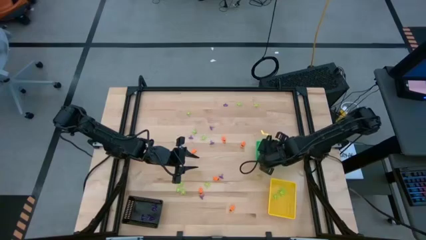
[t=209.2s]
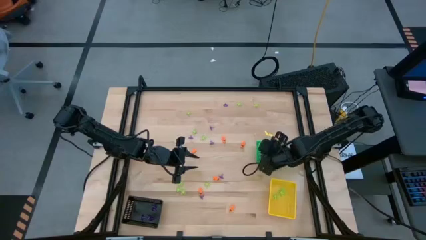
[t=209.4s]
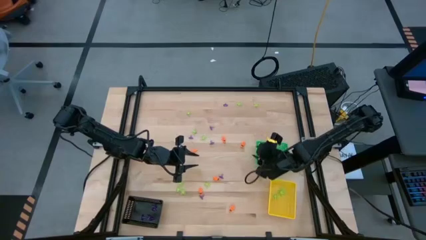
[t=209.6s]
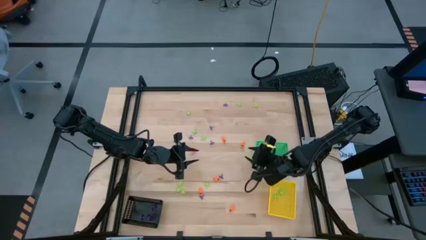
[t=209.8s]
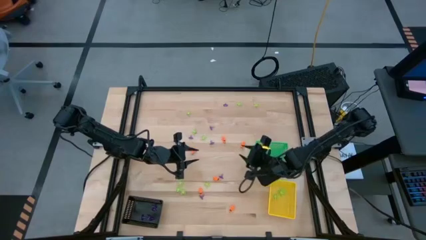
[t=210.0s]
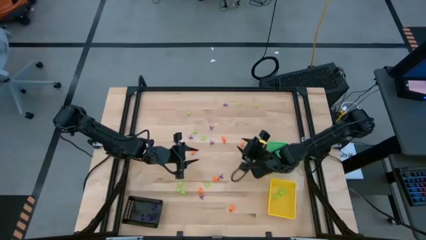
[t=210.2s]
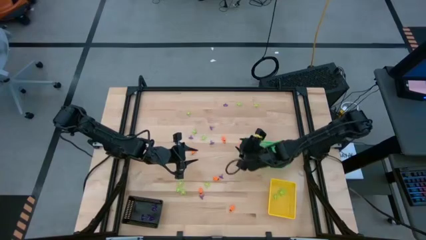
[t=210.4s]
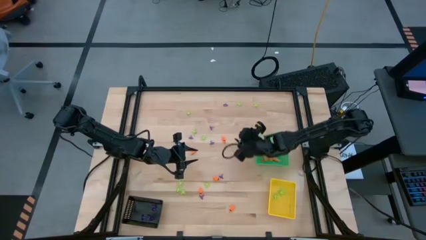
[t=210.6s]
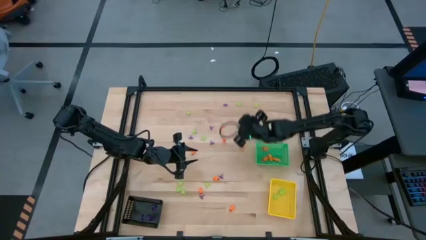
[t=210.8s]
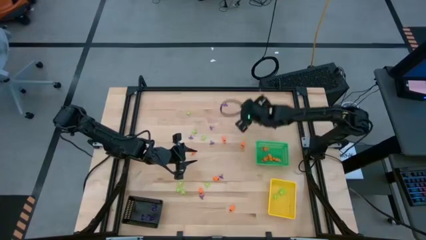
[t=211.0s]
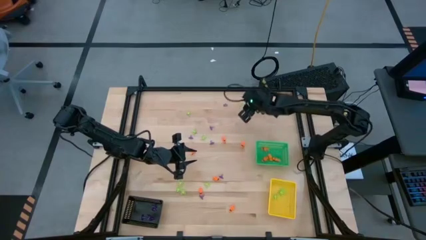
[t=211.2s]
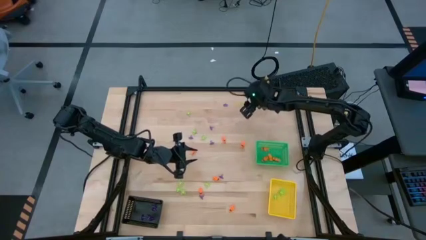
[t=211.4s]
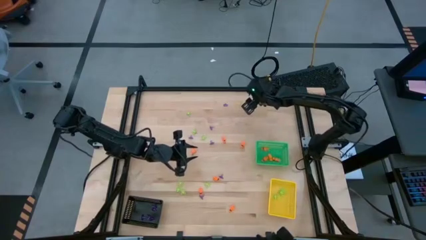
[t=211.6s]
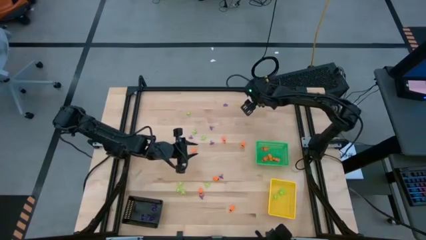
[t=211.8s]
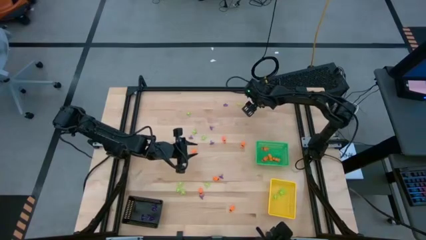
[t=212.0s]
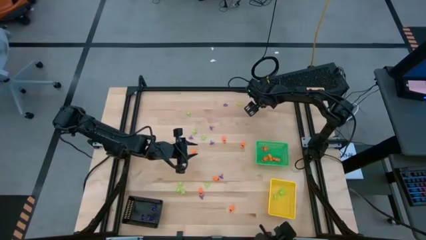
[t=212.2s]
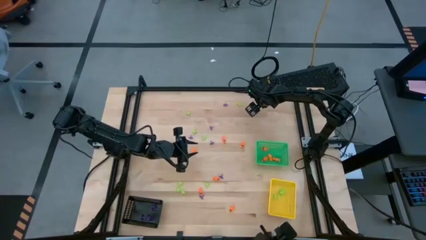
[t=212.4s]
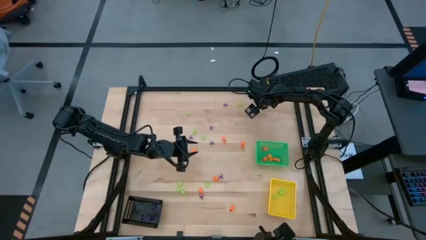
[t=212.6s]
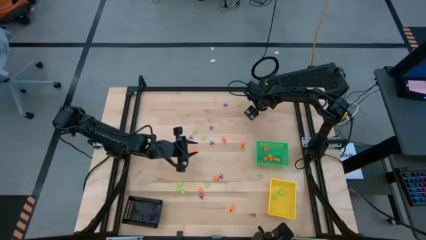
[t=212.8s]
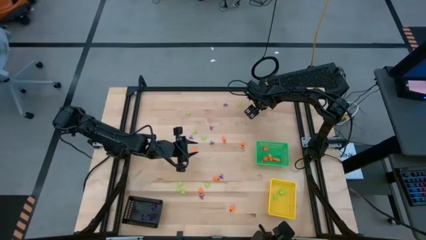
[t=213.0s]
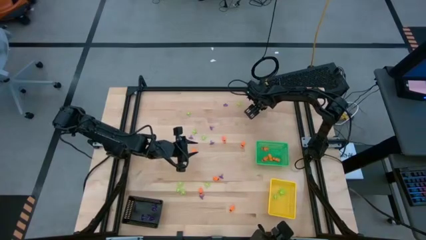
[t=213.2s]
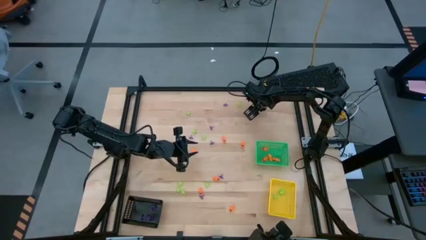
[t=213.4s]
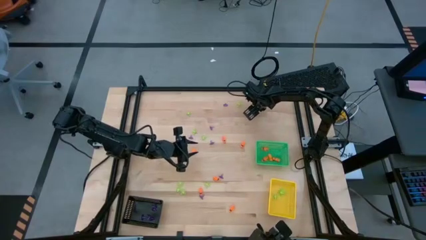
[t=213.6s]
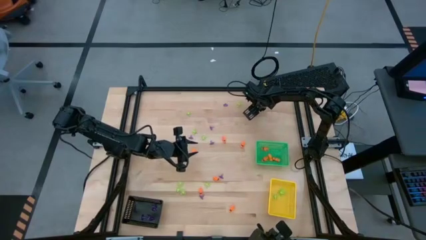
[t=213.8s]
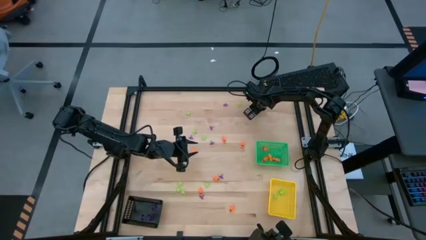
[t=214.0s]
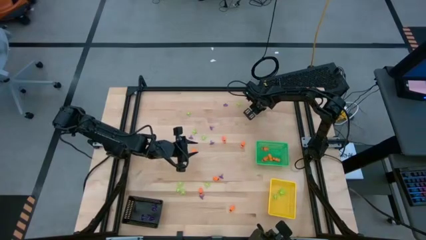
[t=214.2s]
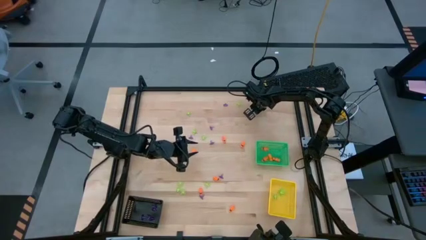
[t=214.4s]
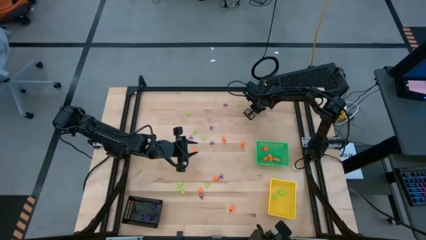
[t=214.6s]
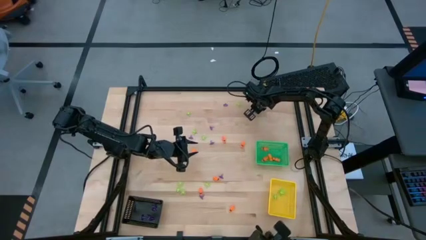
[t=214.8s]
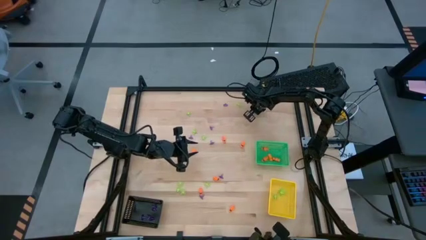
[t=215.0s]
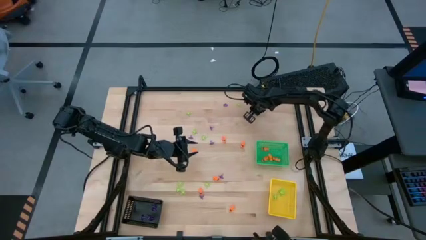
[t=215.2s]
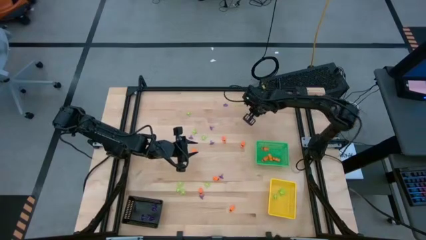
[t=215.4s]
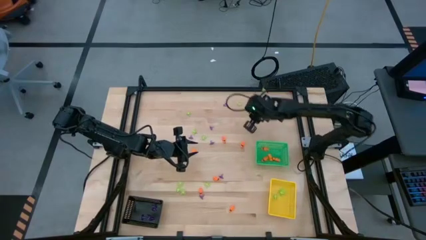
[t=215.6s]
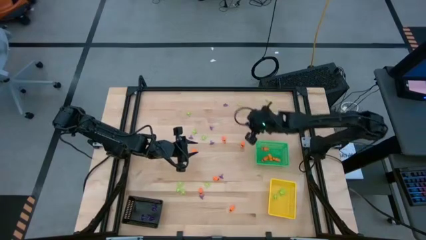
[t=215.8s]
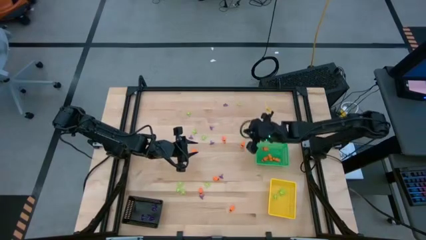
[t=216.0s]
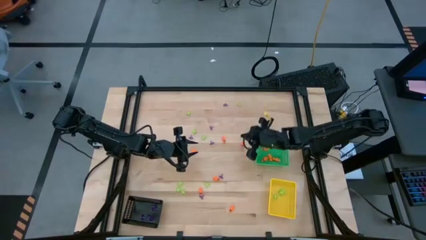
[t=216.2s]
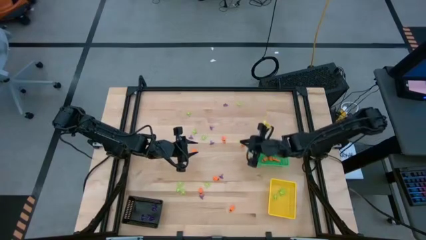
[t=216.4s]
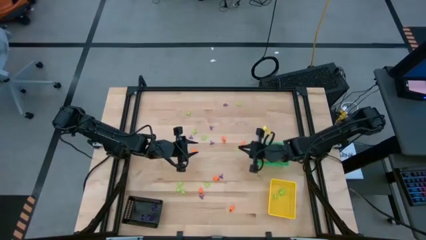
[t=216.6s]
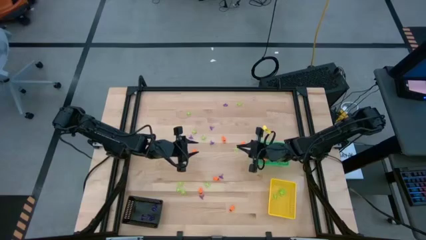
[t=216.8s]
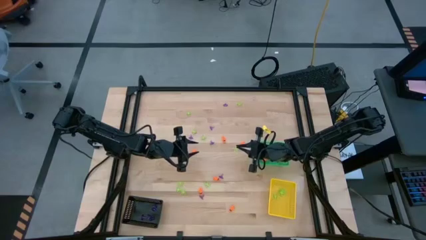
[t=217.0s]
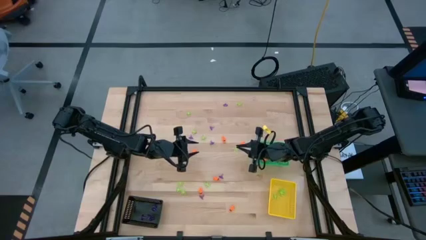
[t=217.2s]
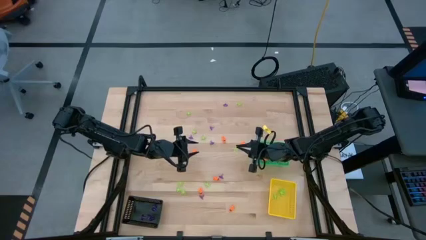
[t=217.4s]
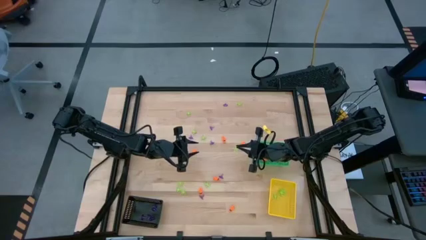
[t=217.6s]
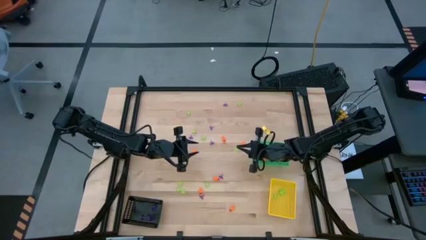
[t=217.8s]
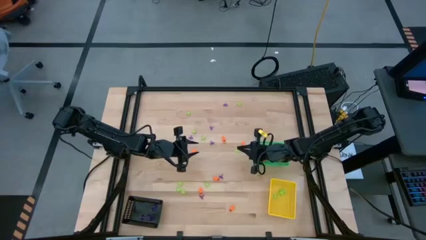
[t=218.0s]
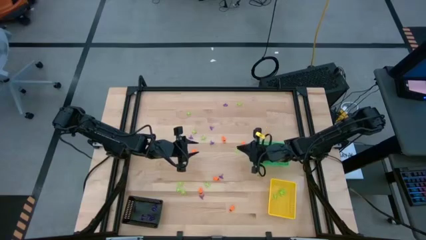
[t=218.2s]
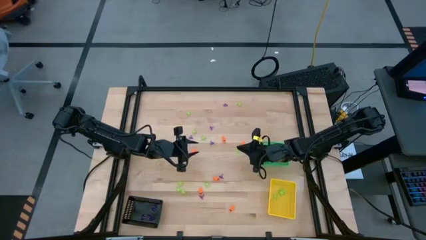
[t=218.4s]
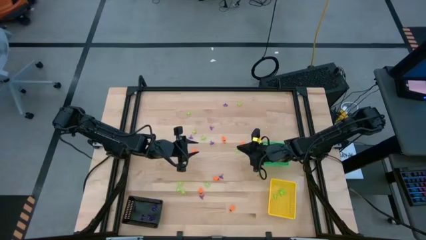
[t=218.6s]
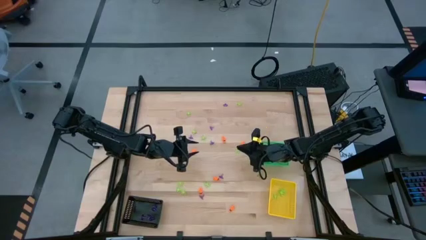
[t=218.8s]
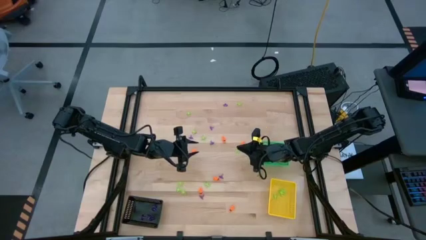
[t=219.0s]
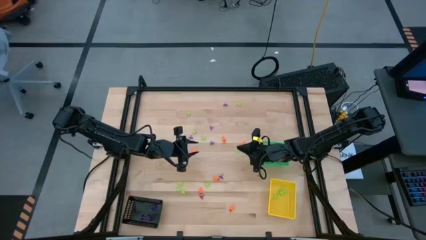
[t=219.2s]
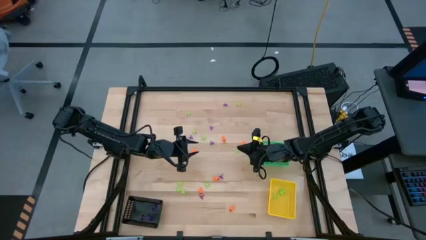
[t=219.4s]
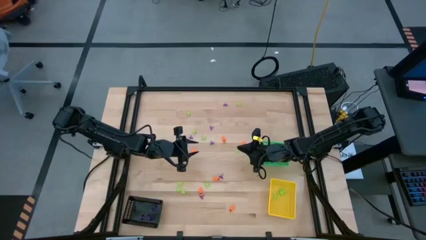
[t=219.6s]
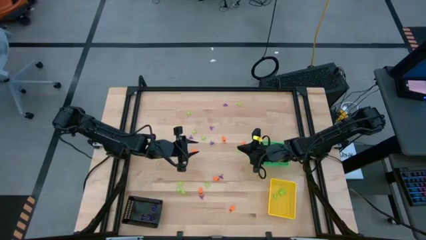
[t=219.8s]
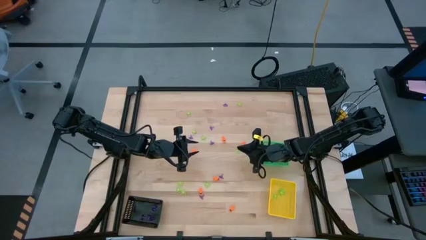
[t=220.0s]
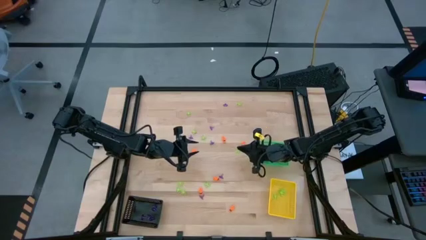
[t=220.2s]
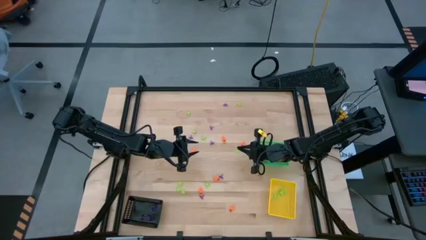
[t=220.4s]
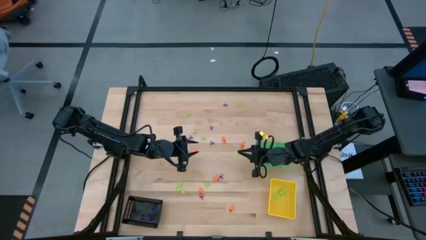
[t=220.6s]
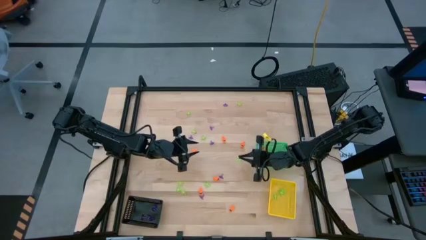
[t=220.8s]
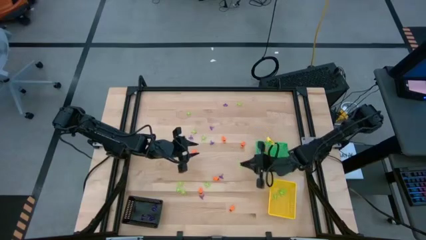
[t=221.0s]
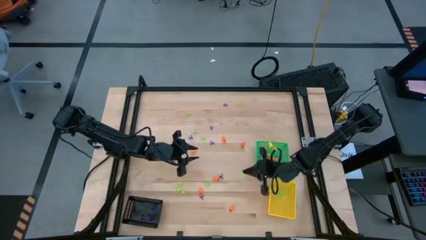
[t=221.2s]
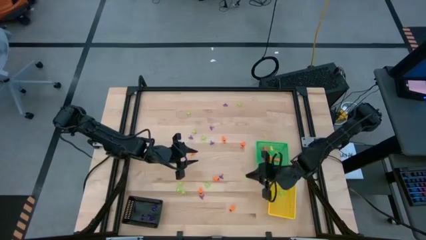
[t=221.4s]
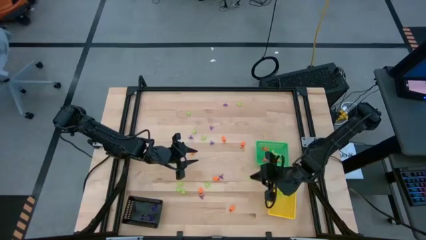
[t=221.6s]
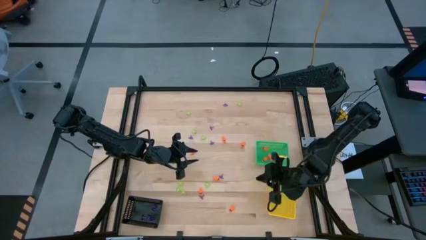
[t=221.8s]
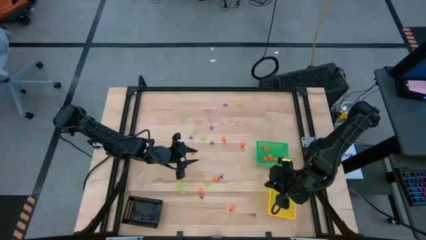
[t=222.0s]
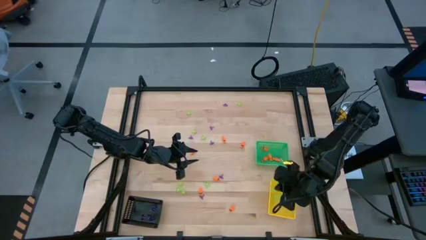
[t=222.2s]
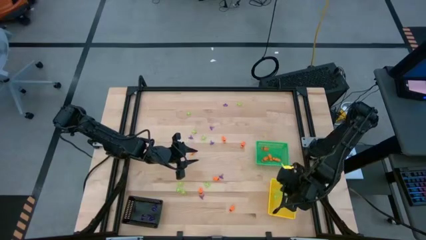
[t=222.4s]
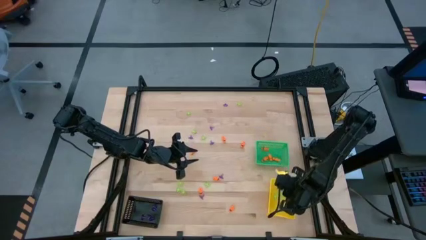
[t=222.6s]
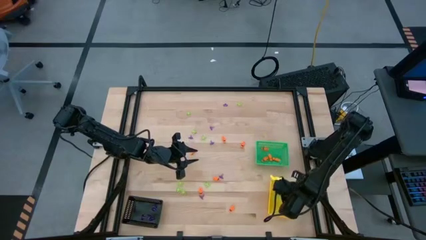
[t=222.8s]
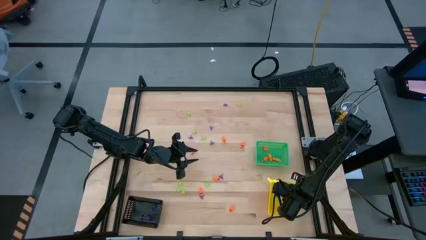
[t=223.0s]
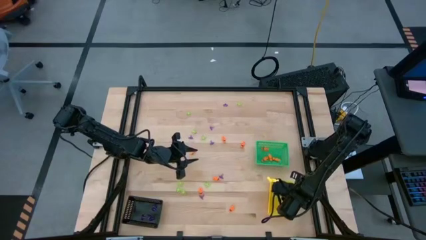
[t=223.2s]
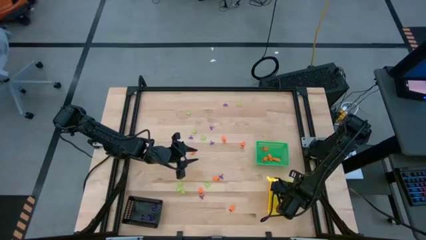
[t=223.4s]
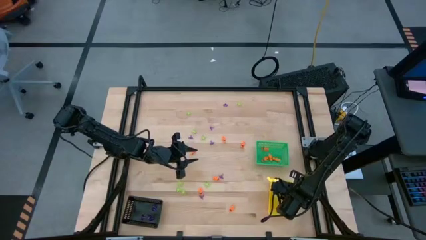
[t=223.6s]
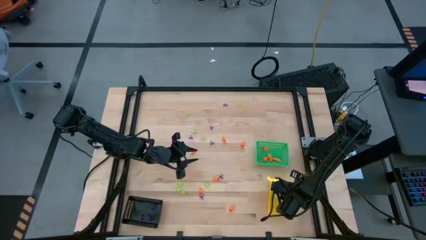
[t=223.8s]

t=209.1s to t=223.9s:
Task: Sort Halloween decoration
Put the green spider toy into the yellow bin
